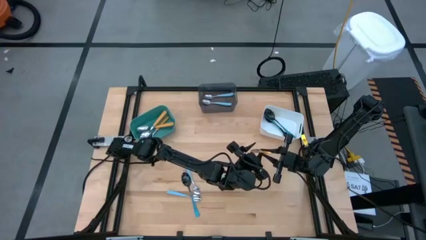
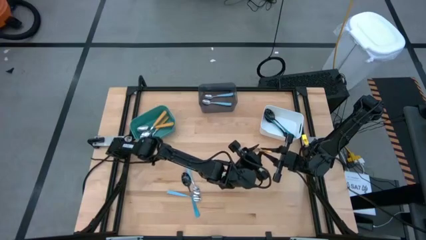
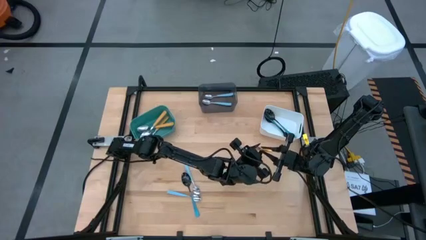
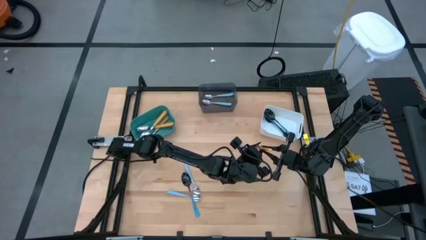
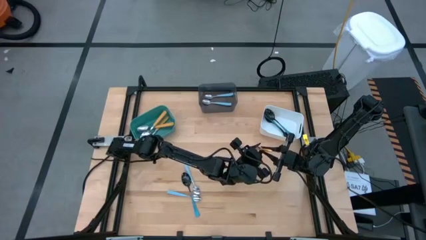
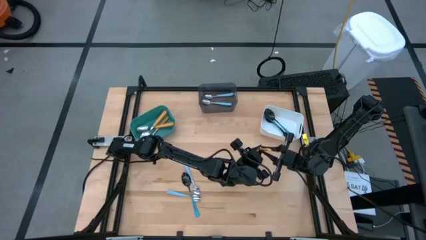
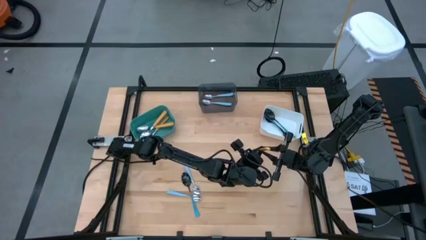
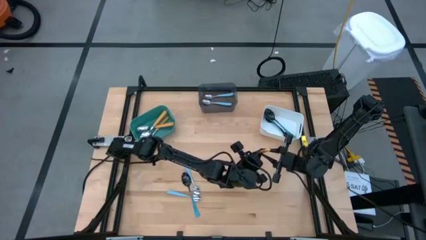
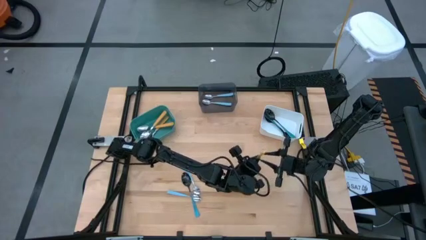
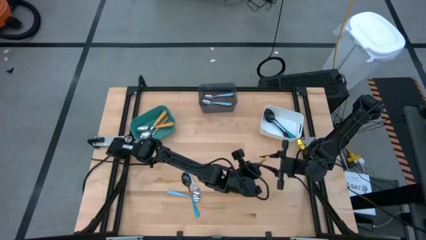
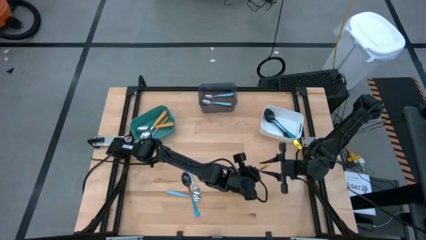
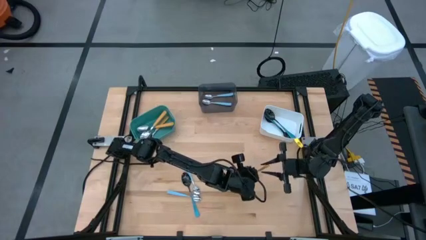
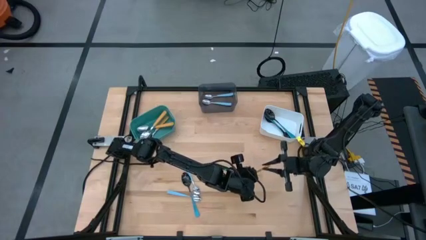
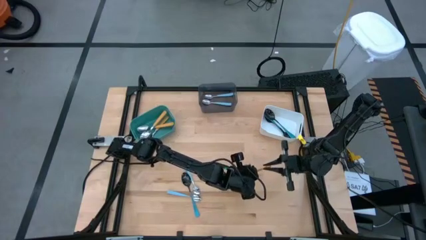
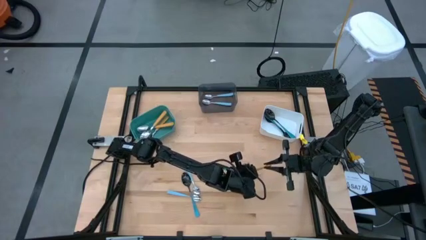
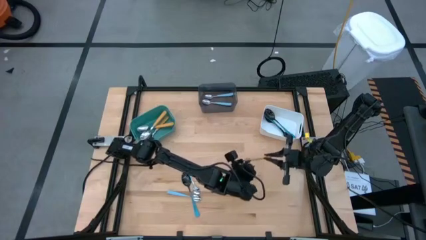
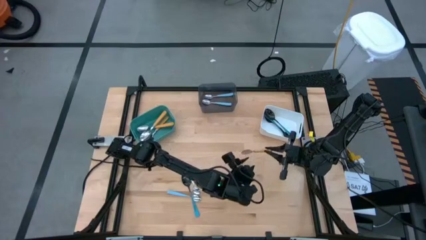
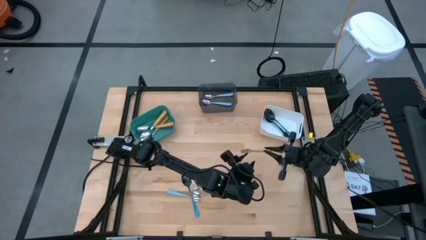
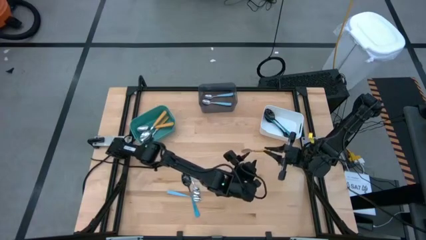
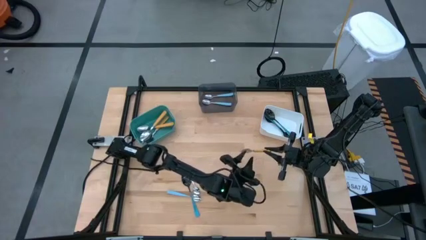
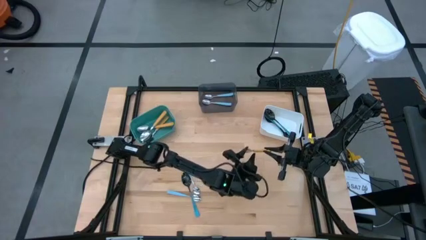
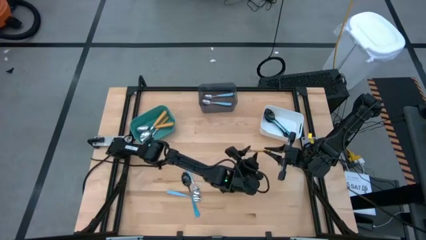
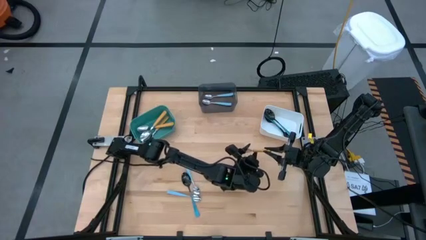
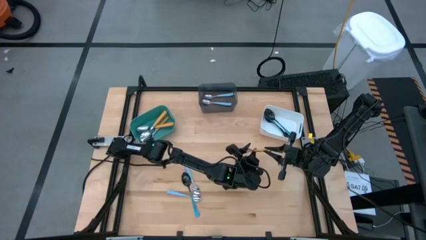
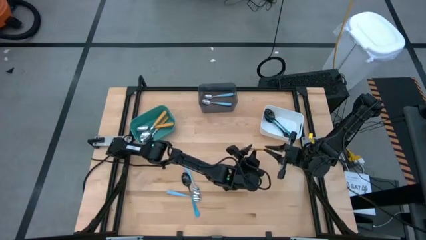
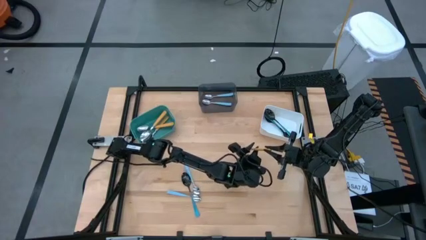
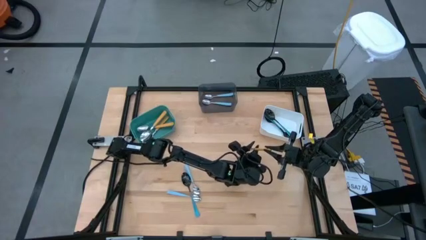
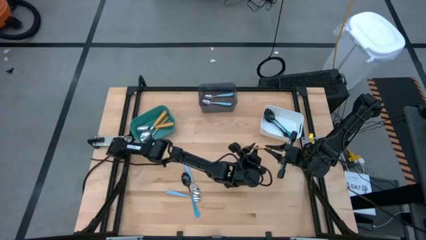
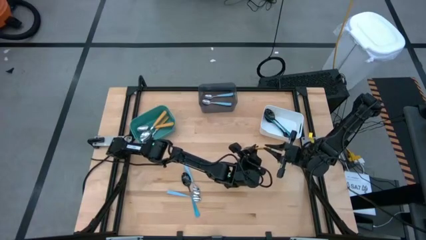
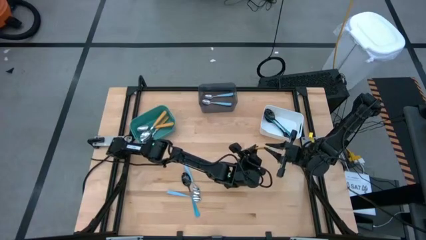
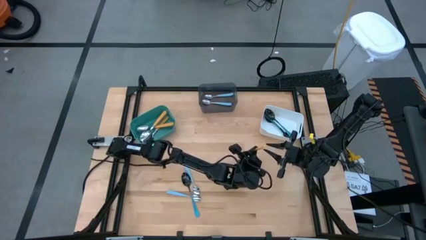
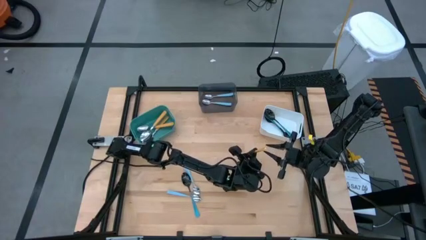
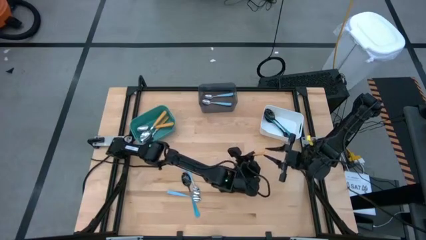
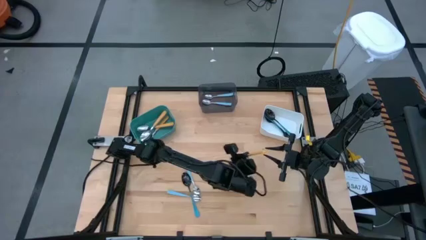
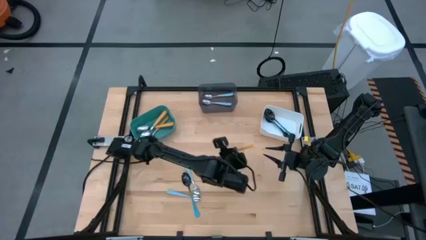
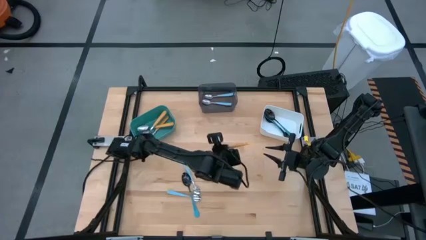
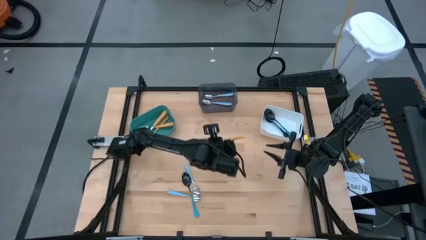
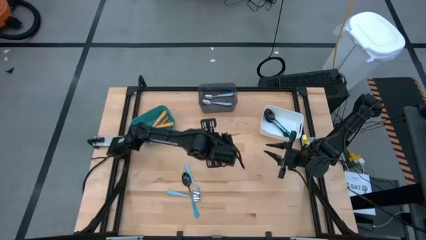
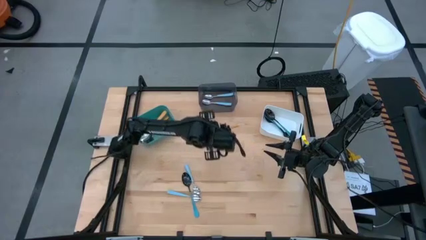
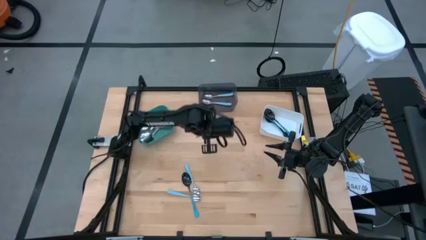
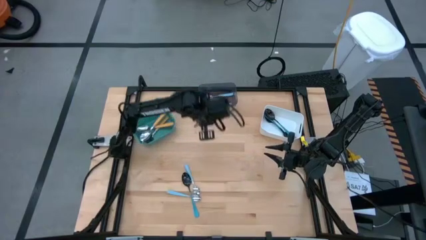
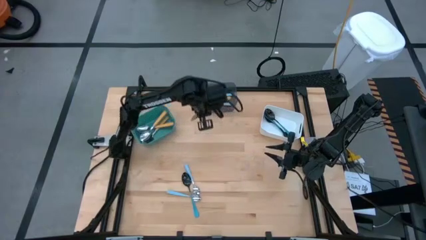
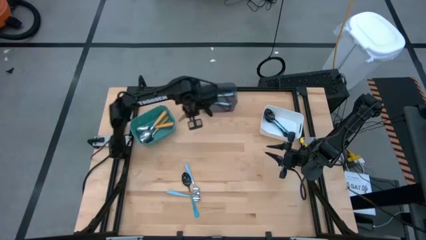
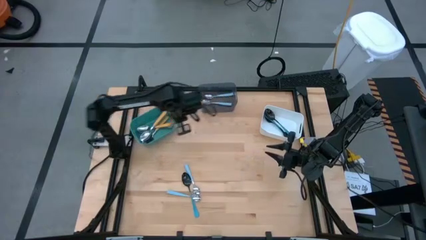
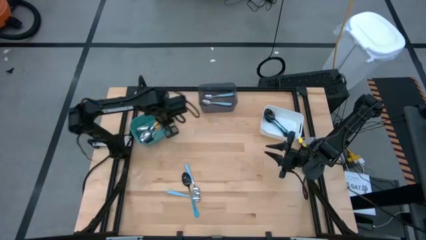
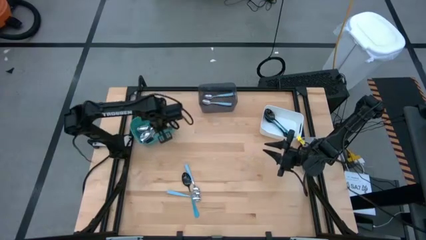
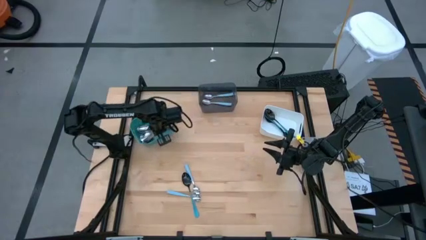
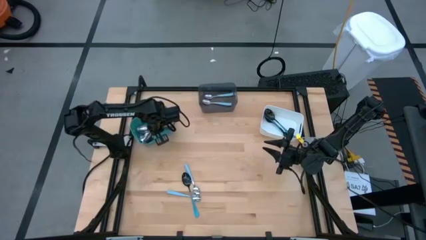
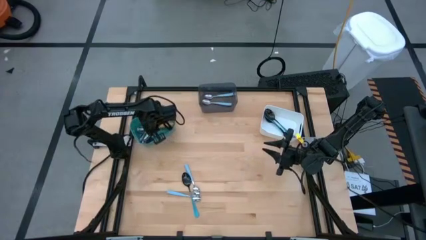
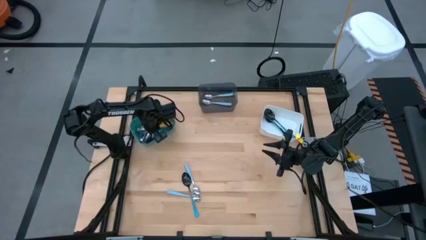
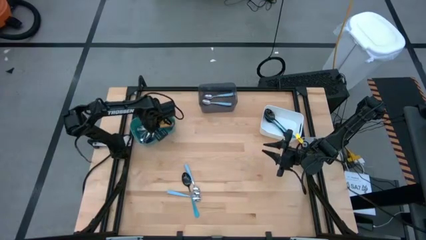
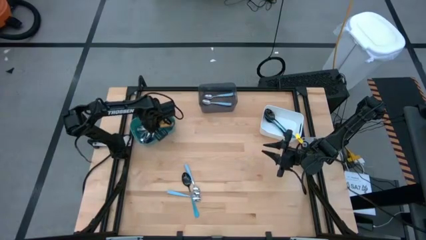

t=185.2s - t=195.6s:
Task: Sort silverware by color (type)
Put the yellow spoon into the green bin

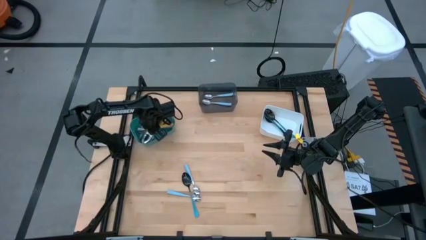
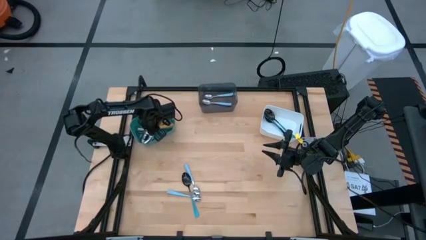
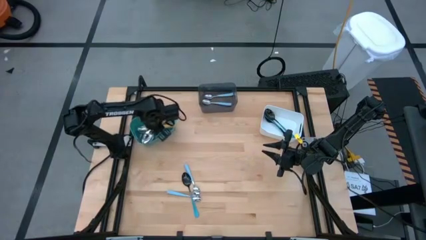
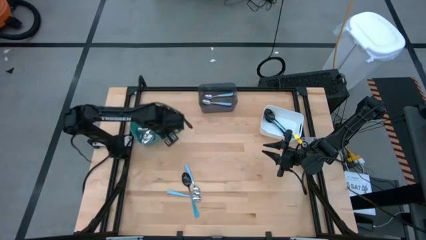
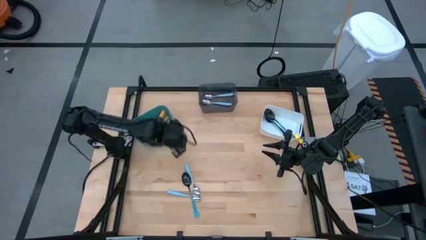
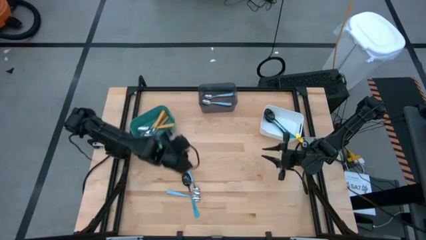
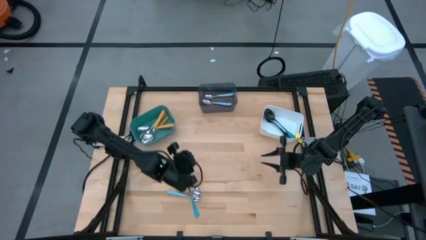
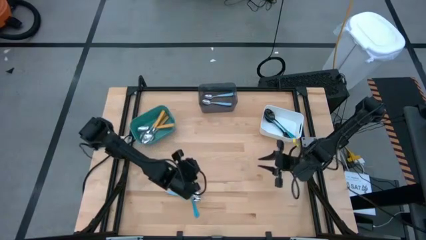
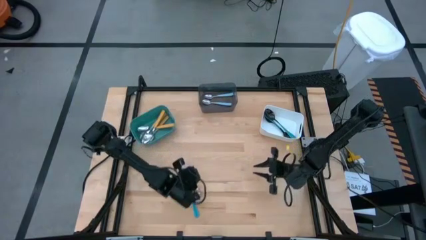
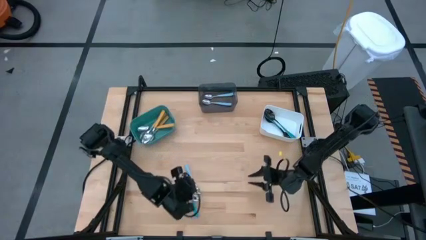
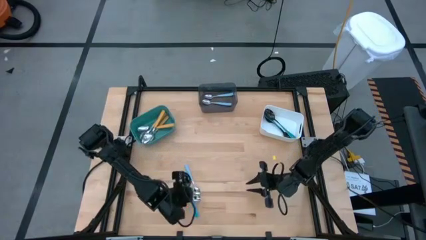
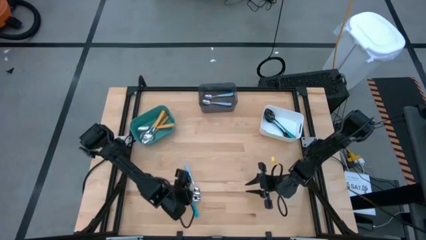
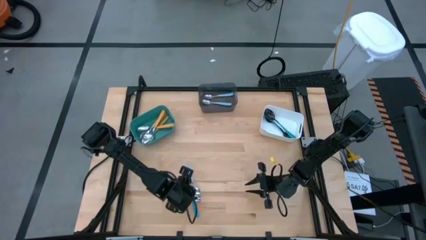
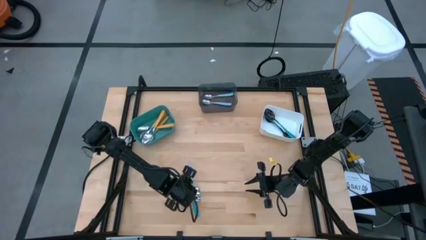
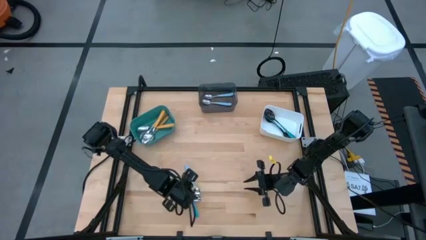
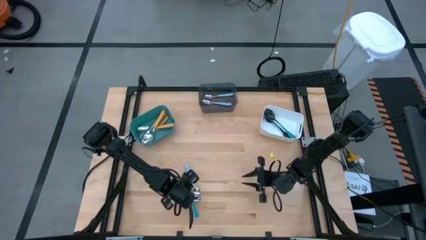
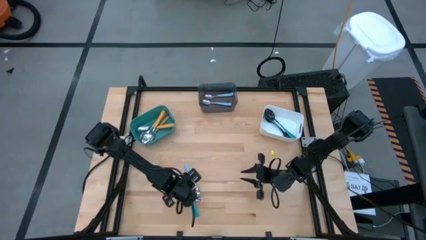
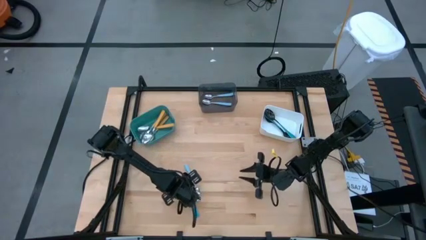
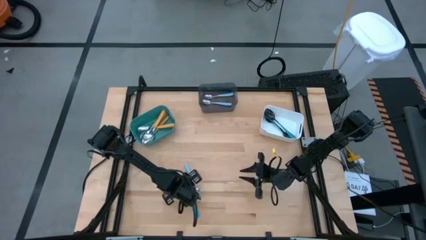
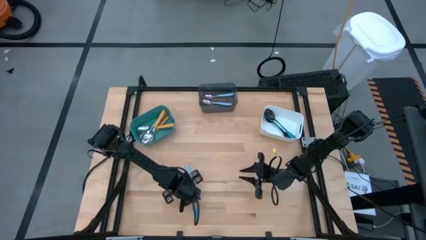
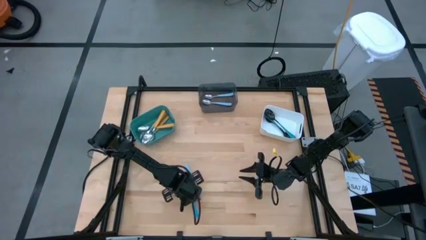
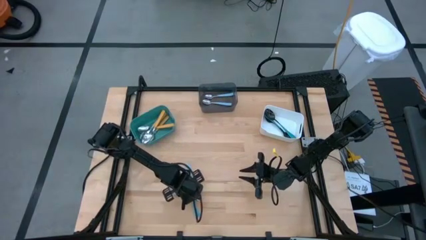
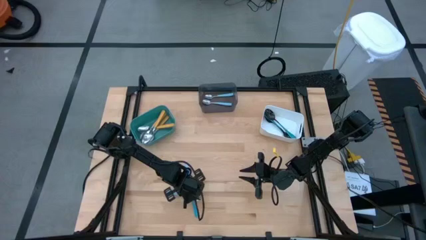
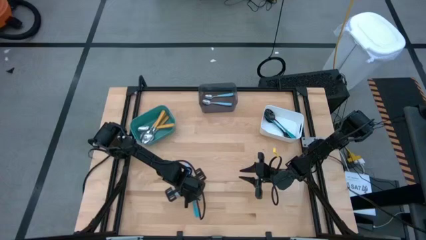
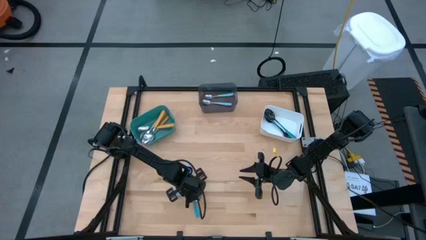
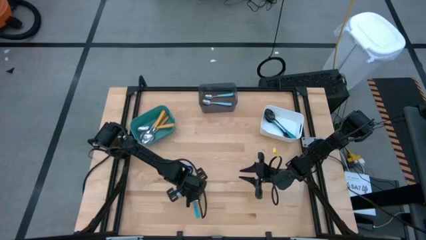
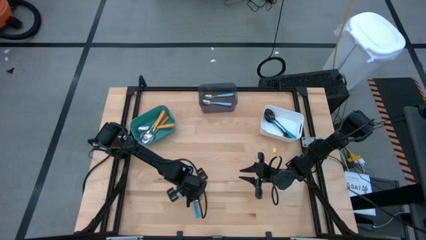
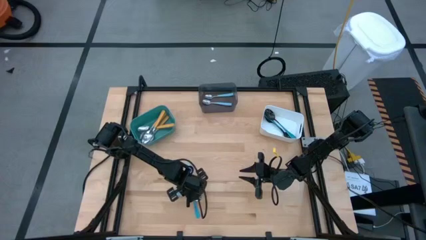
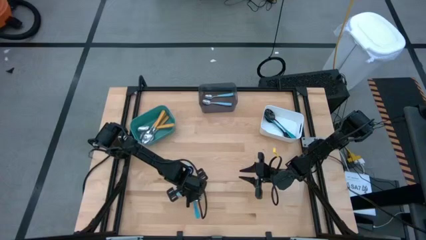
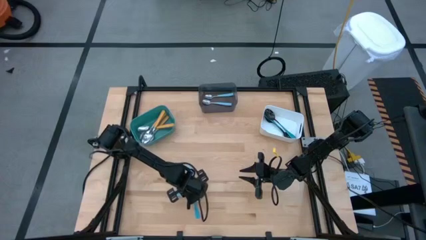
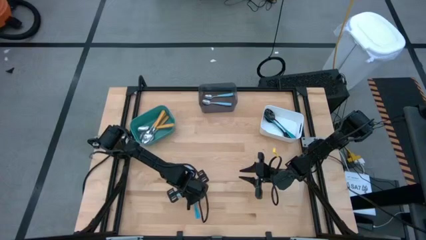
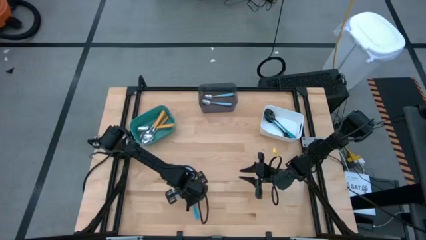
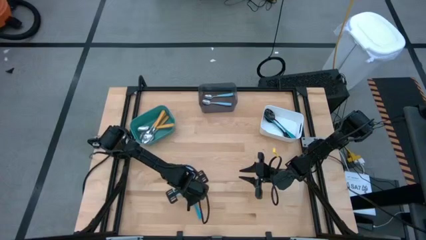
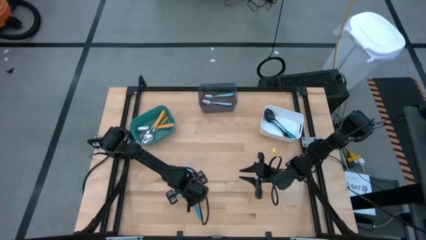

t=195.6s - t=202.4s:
Put the blue spoon into the white bin
